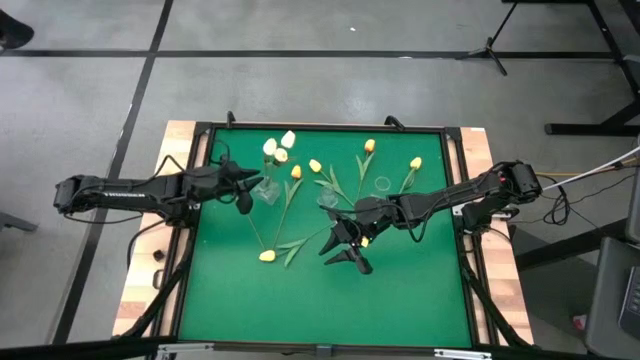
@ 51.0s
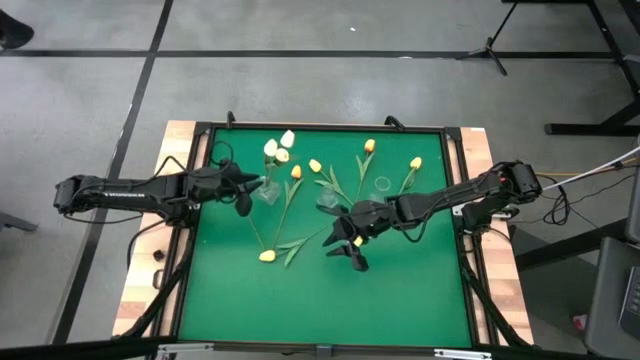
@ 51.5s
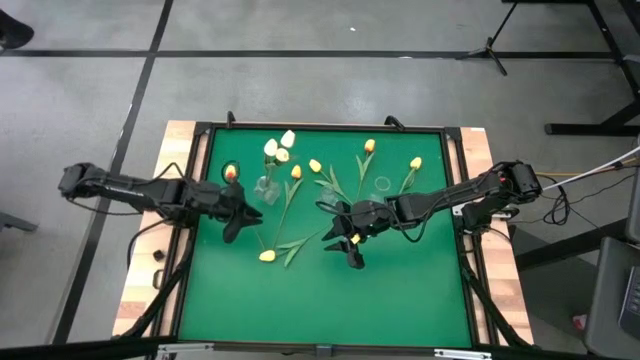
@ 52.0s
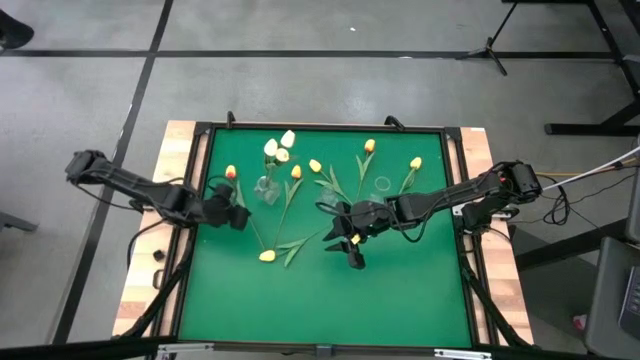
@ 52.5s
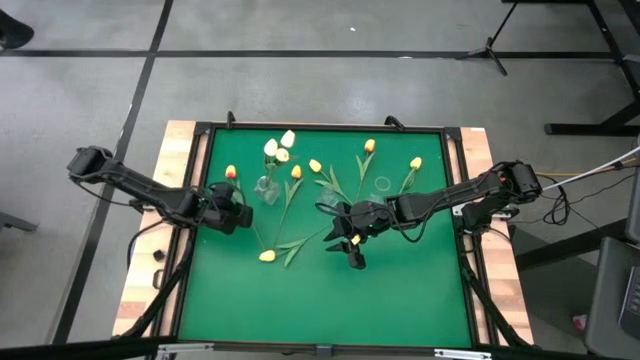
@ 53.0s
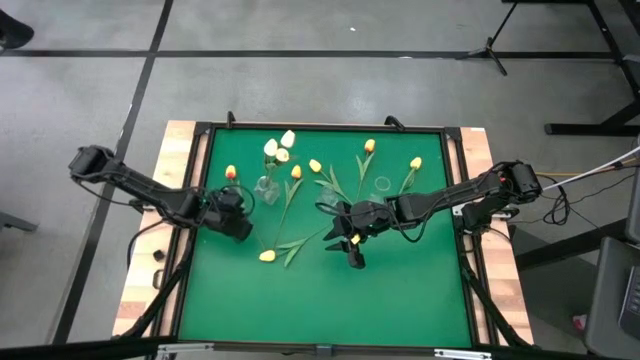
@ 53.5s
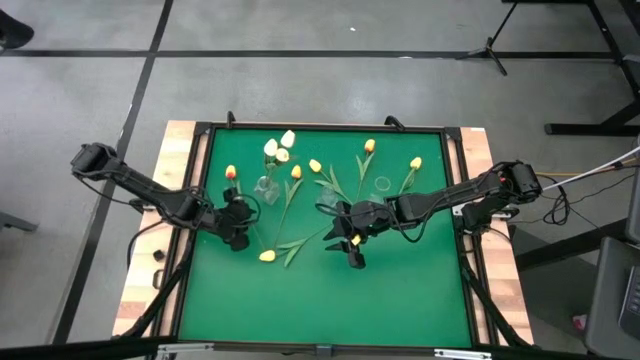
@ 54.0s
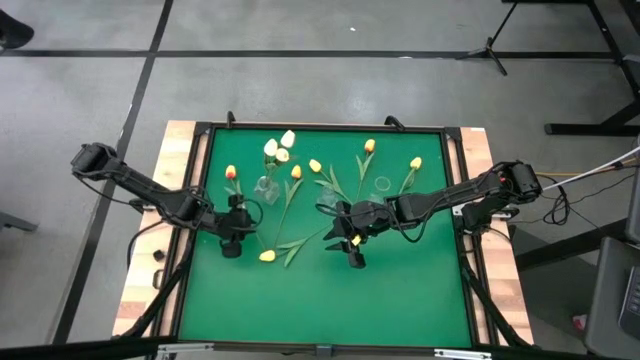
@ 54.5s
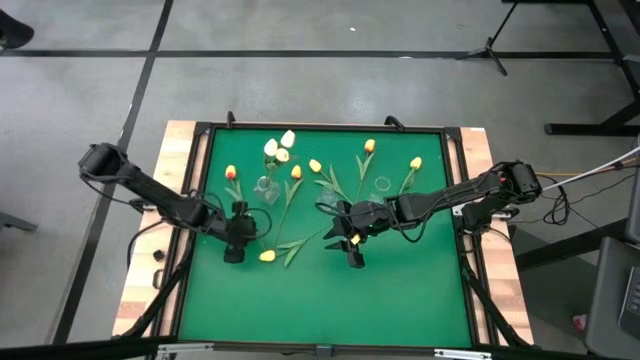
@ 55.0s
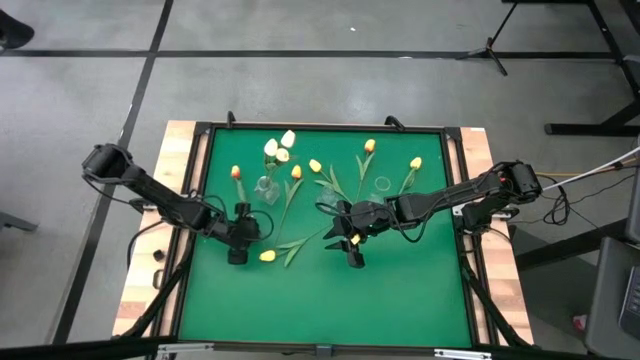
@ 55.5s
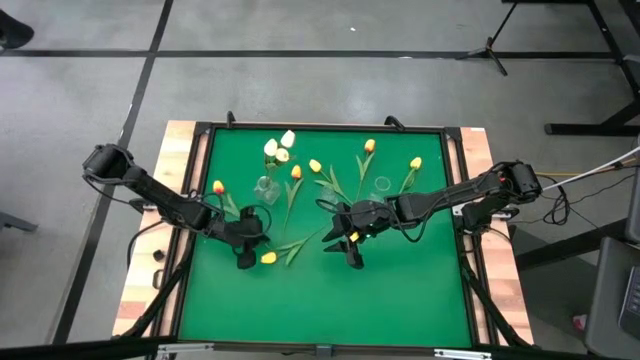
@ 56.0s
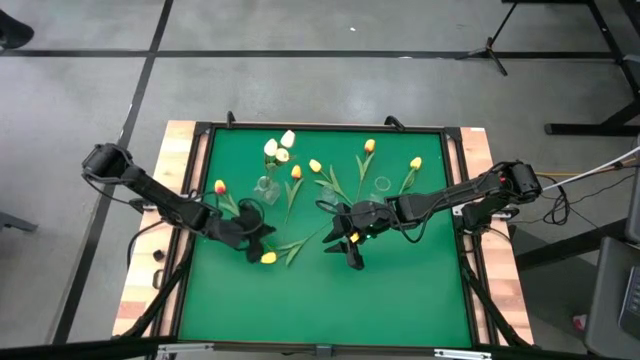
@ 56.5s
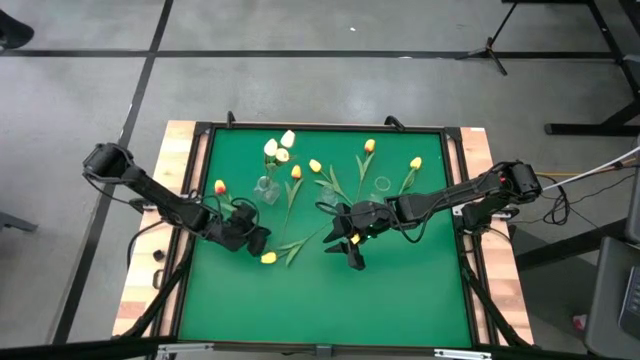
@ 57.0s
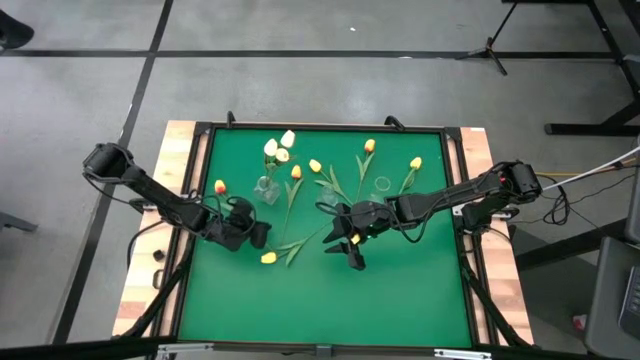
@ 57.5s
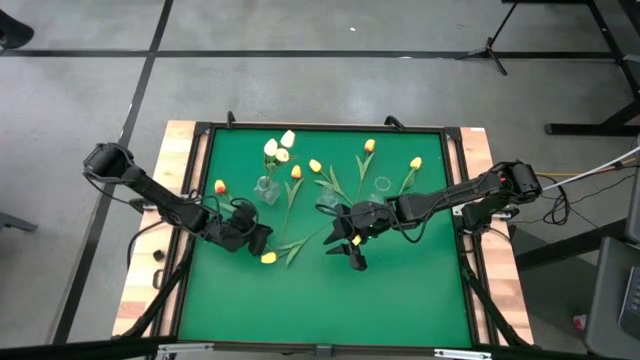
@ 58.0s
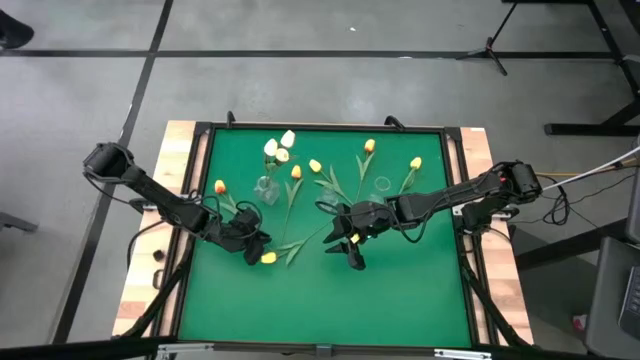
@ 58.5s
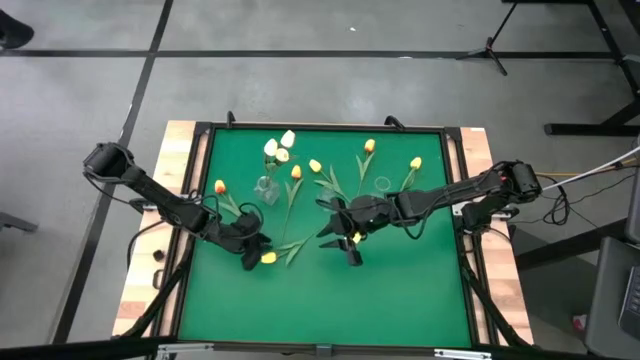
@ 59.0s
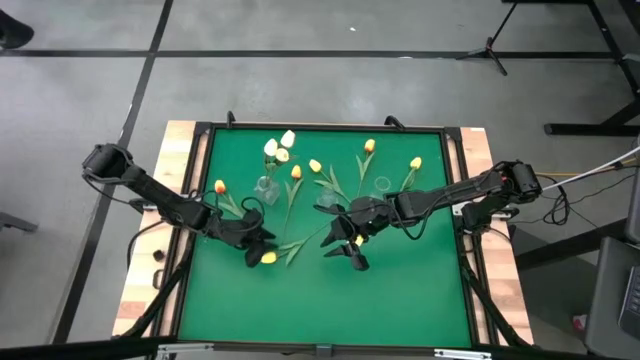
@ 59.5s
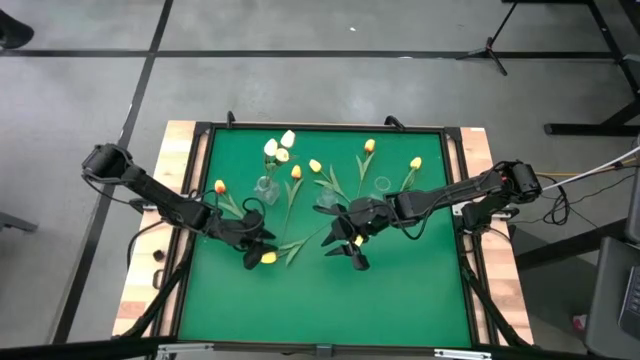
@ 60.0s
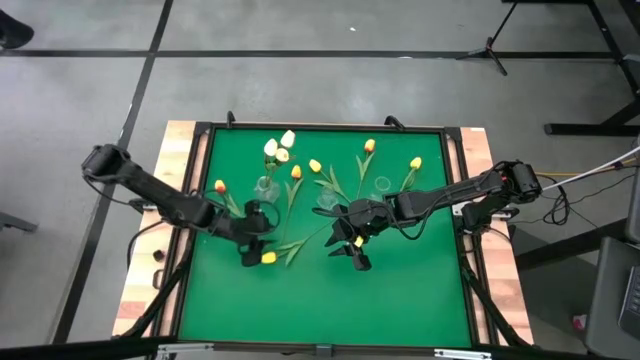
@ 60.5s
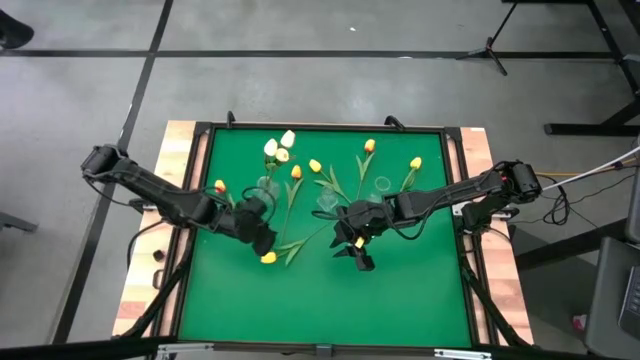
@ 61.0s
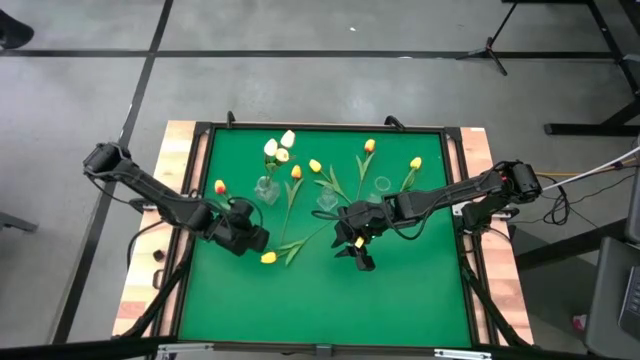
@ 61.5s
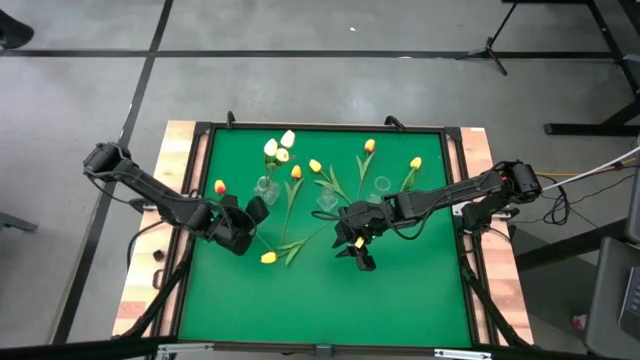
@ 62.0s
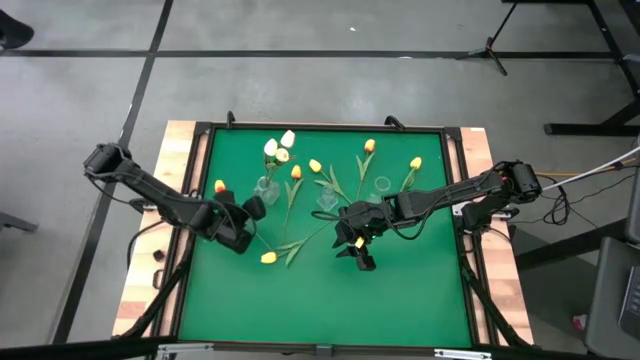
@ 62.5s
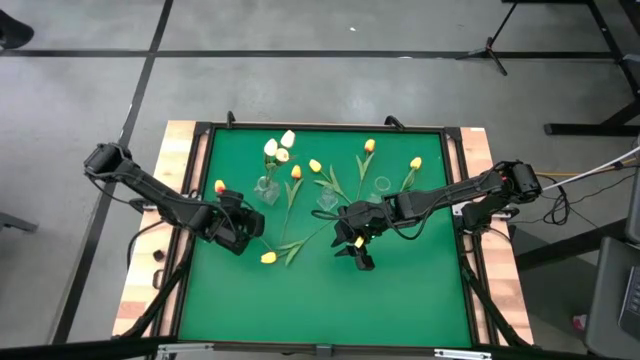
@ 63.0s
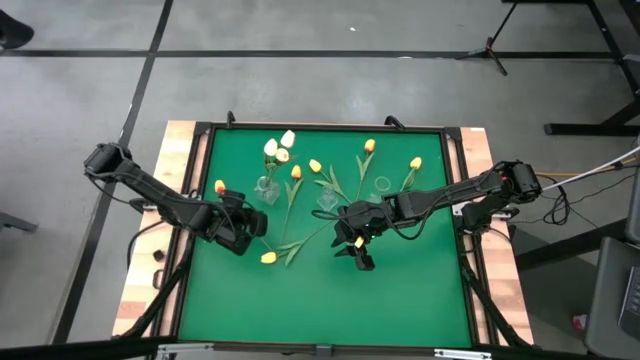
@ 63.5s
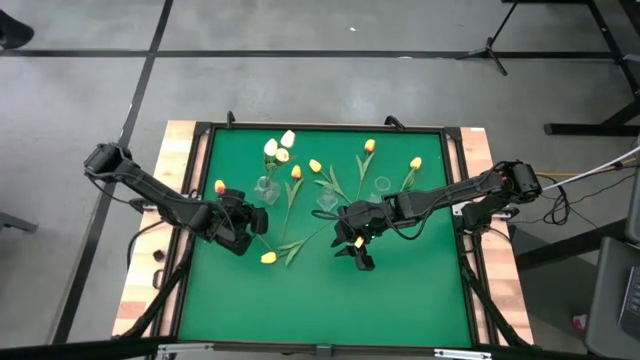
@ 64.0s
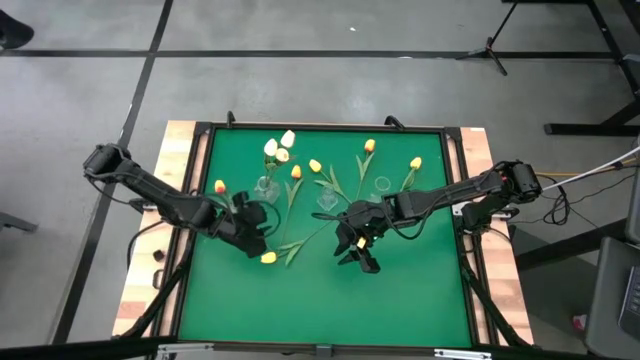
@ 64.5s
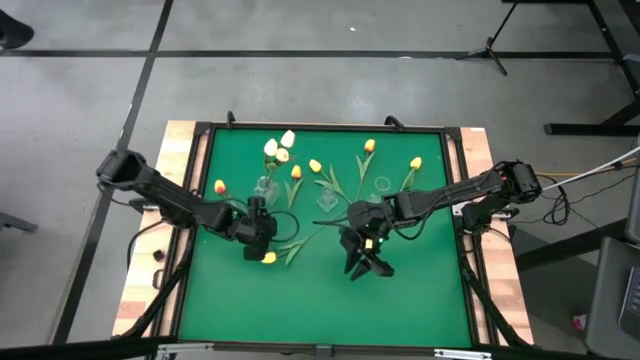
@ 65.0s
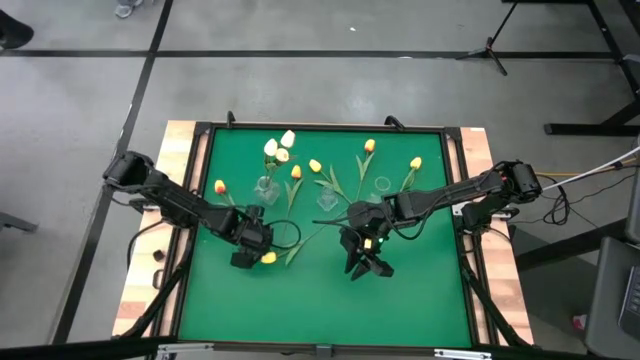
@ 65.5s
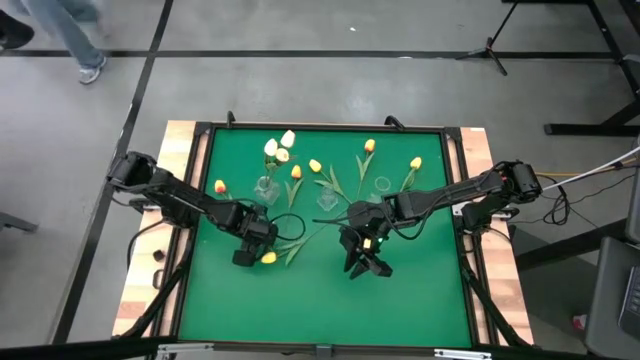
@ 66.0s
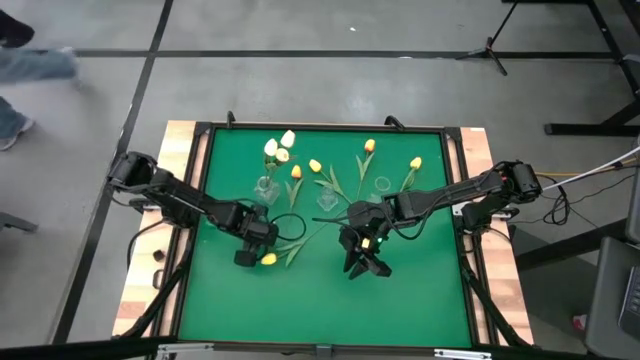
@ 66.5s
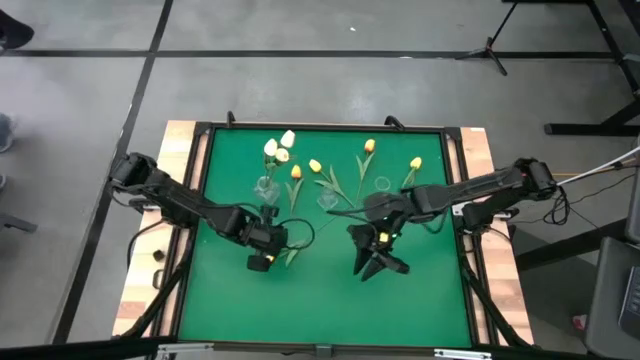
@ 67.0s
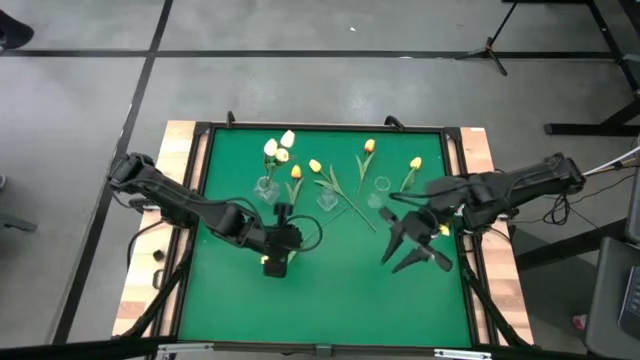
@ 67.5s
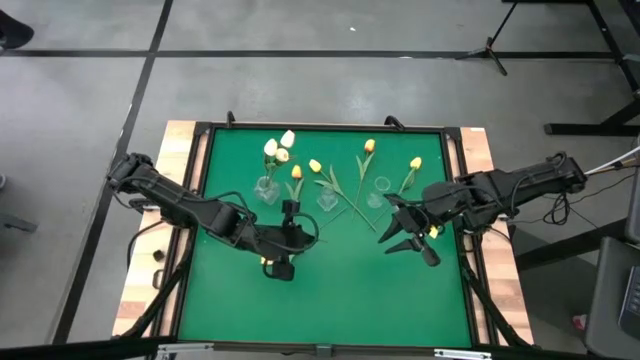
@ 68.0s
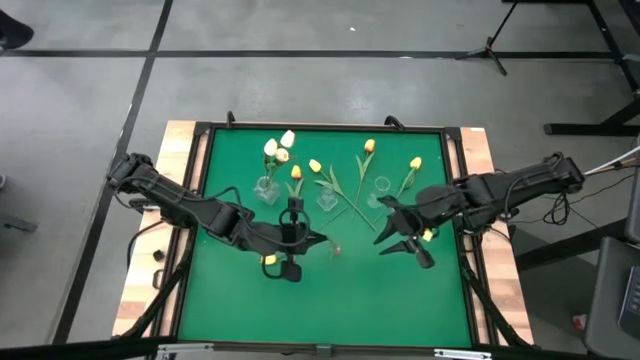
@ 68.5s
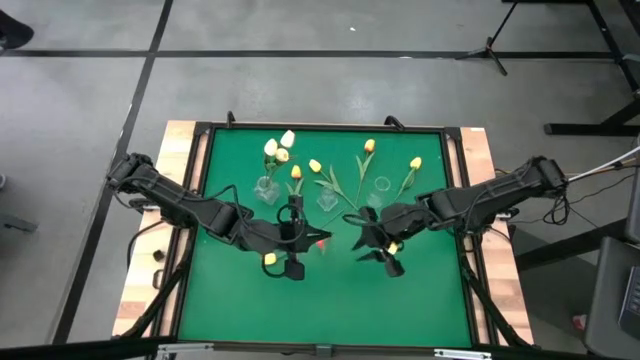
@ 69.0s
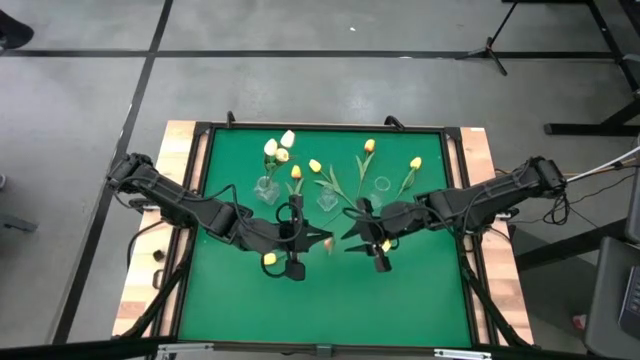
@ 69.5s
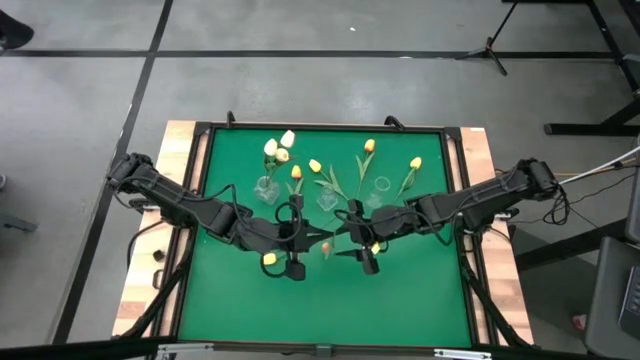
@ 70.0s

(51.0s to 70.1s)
Task: Sort flowers into vase by color
Put the left yellow with orange flower into the center transparent vase

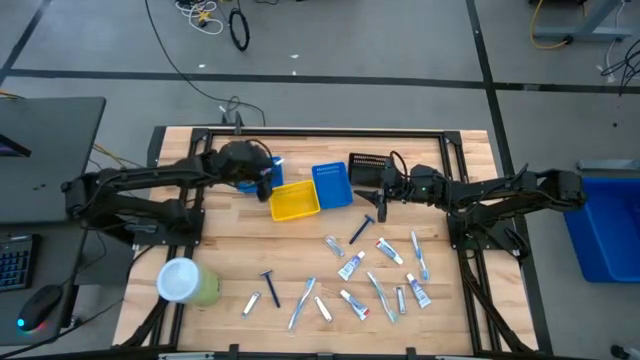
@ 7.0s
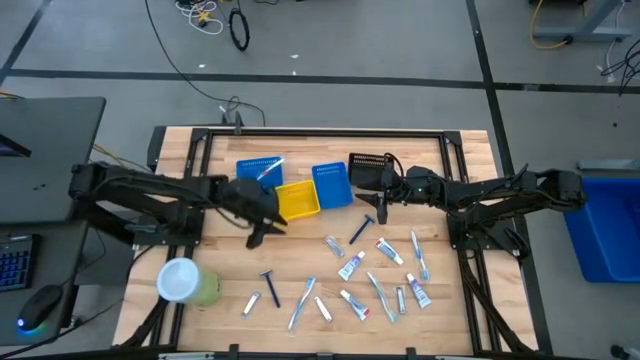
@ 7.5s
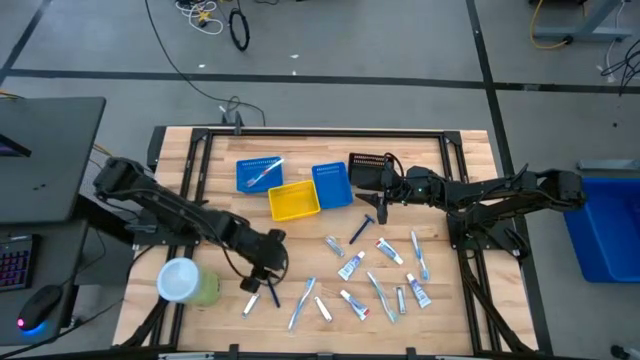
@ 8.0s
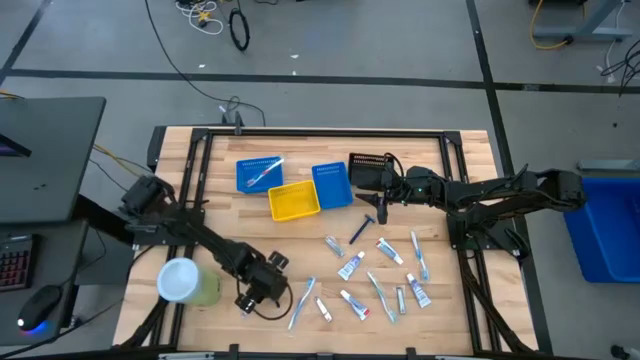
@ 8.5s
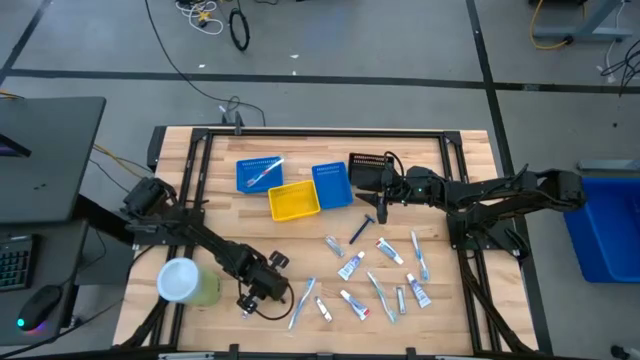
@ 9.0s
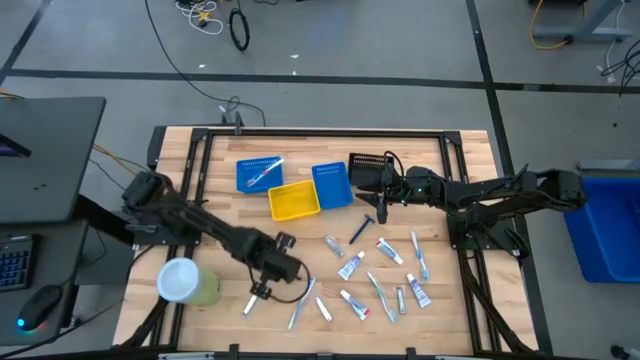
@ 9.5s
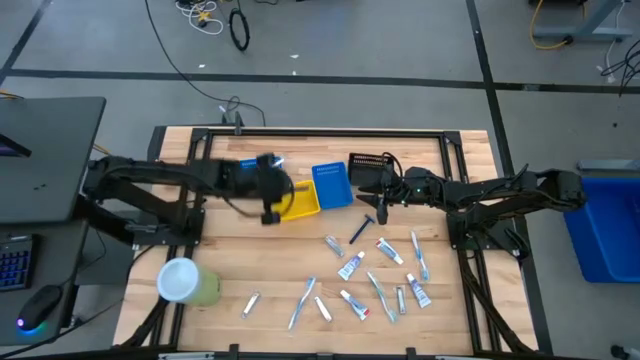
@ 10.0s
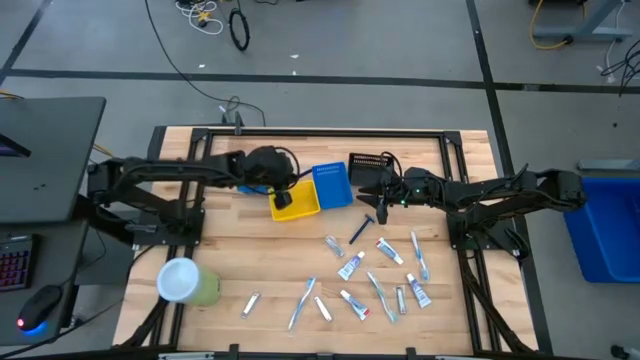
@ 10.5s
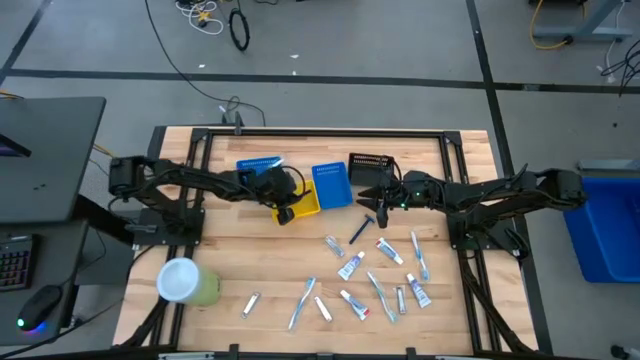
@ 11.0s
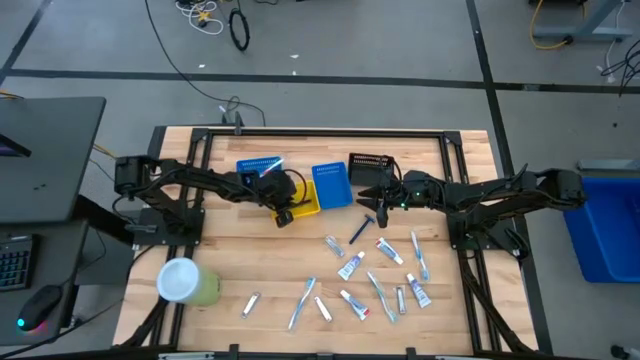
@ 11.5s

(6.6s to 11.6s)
Task: Pick & Place Travel size toiletries
Put the razor into the yellow bin
